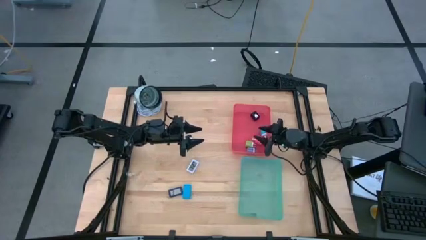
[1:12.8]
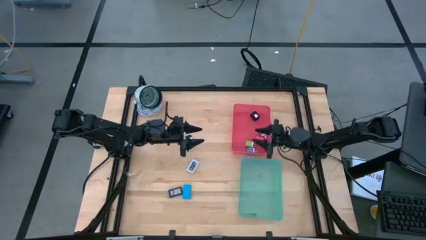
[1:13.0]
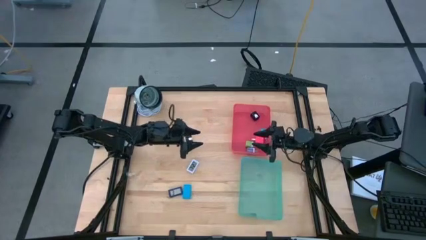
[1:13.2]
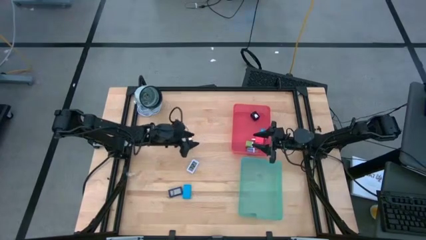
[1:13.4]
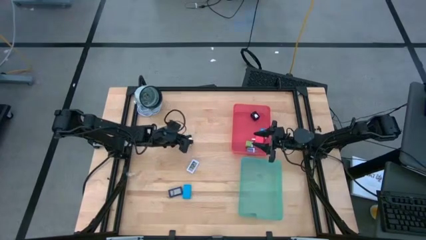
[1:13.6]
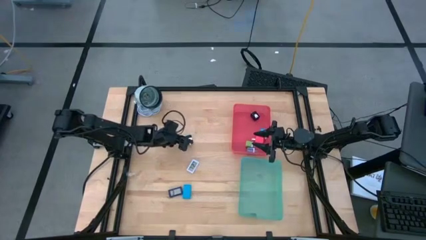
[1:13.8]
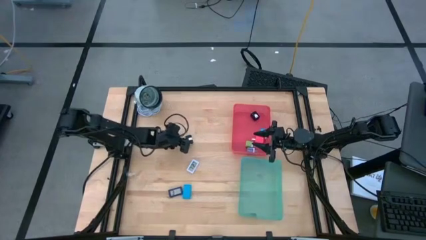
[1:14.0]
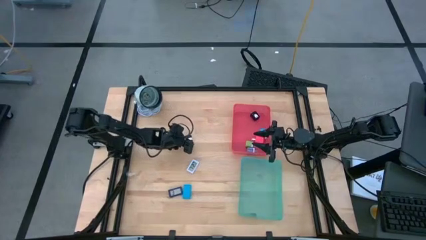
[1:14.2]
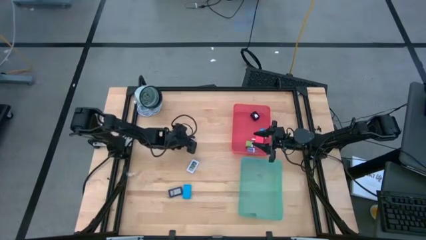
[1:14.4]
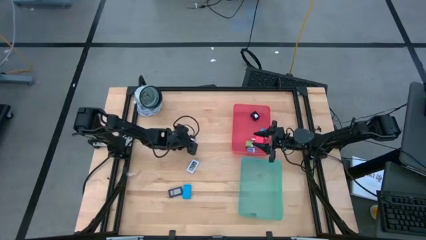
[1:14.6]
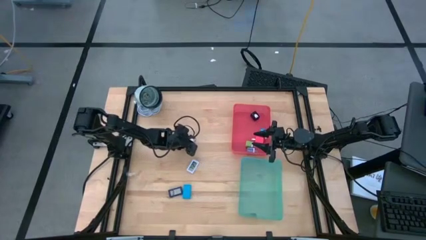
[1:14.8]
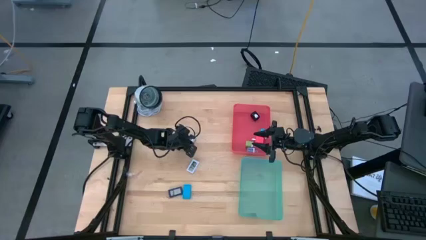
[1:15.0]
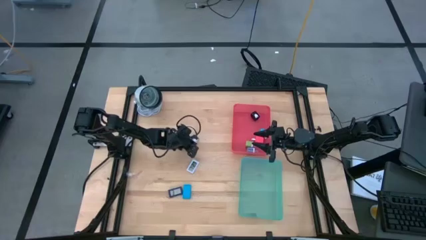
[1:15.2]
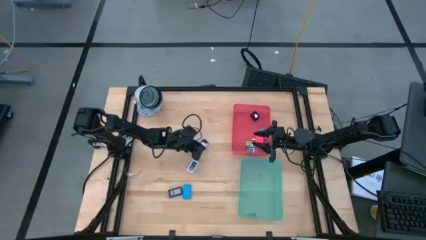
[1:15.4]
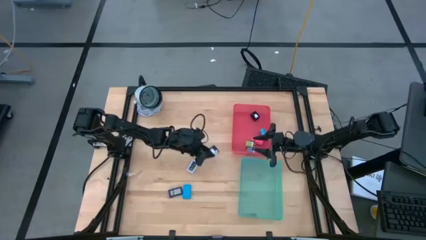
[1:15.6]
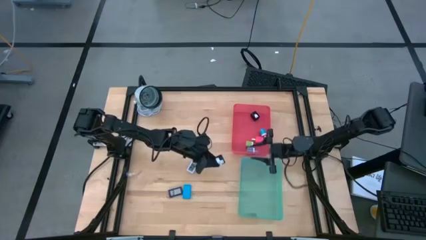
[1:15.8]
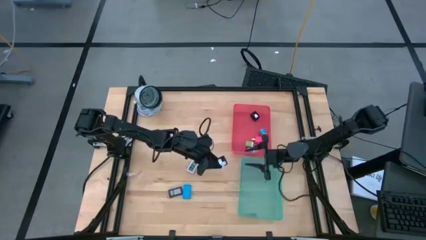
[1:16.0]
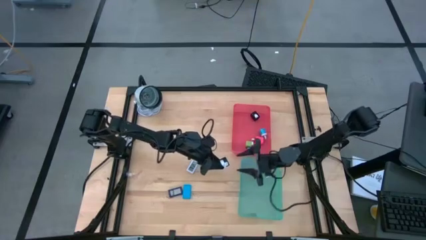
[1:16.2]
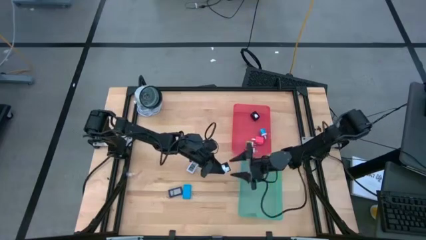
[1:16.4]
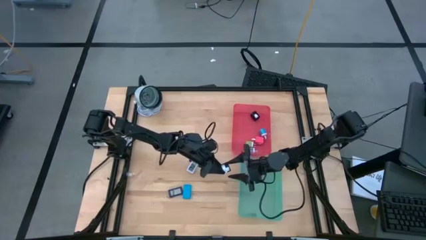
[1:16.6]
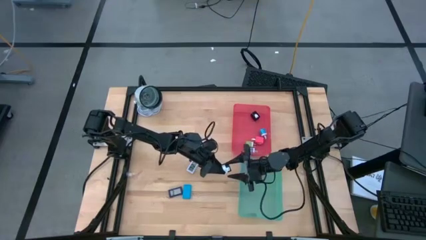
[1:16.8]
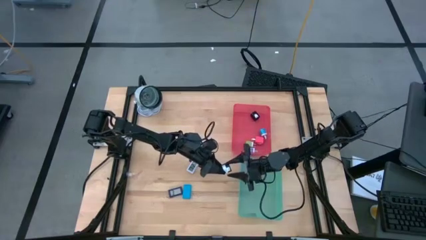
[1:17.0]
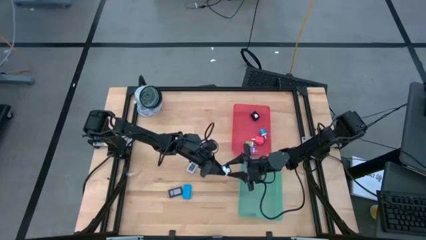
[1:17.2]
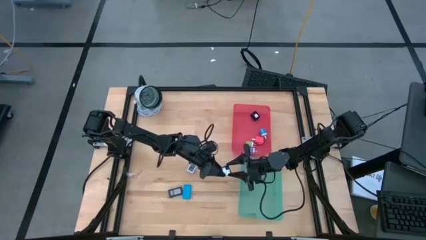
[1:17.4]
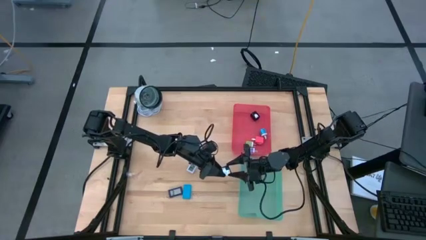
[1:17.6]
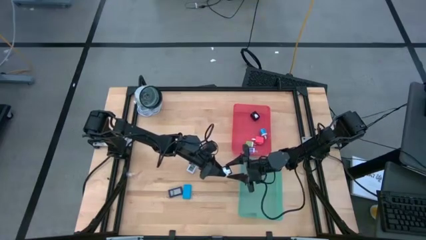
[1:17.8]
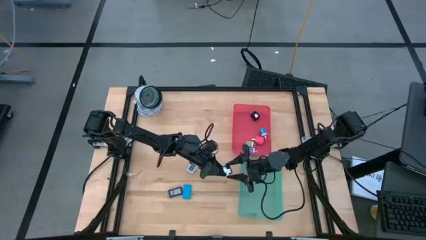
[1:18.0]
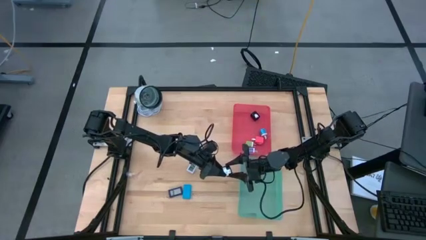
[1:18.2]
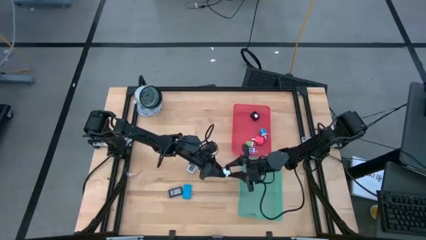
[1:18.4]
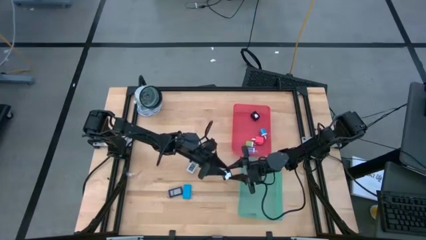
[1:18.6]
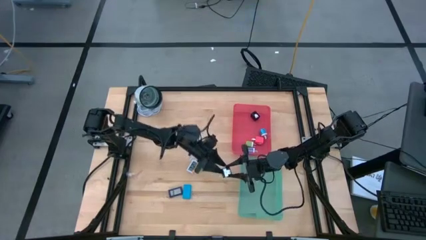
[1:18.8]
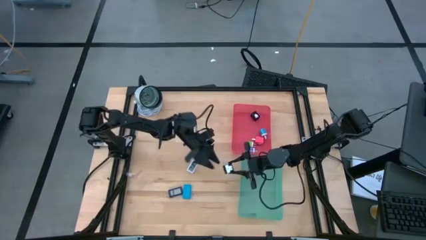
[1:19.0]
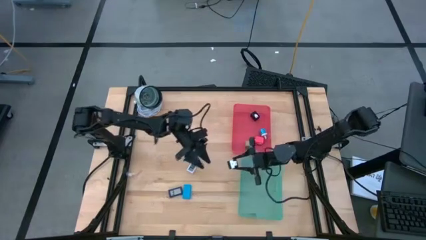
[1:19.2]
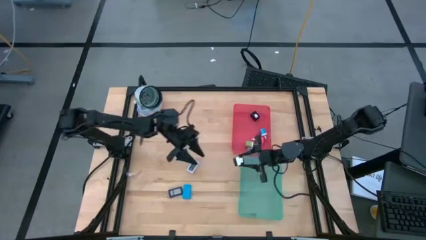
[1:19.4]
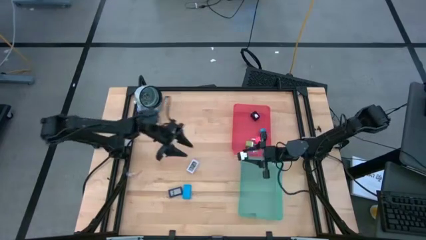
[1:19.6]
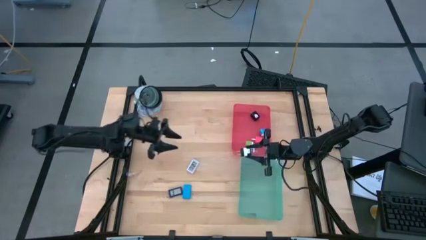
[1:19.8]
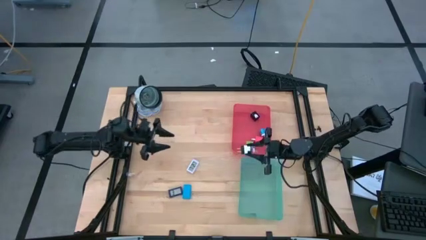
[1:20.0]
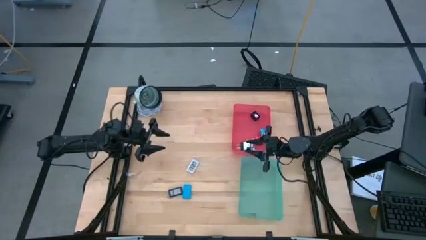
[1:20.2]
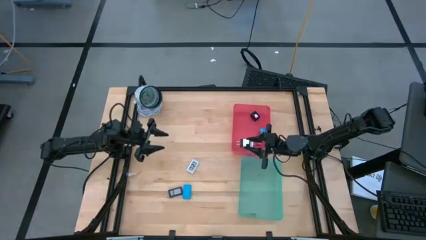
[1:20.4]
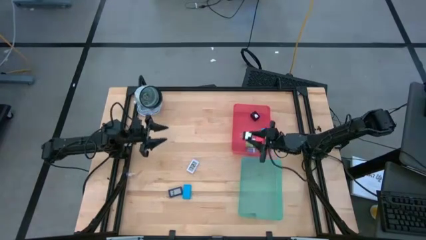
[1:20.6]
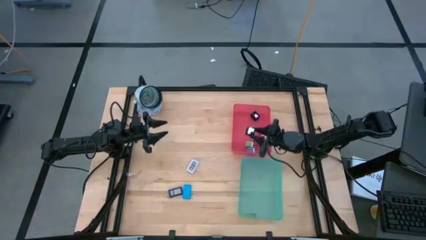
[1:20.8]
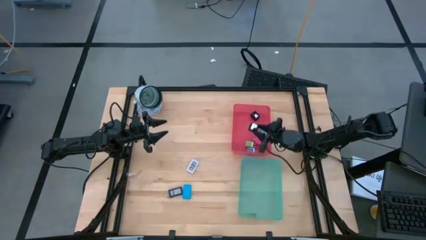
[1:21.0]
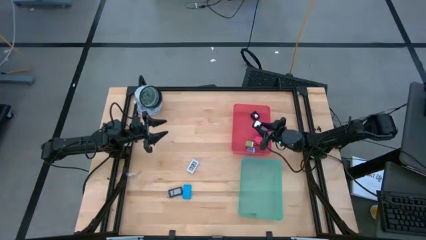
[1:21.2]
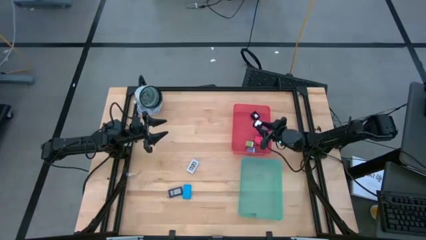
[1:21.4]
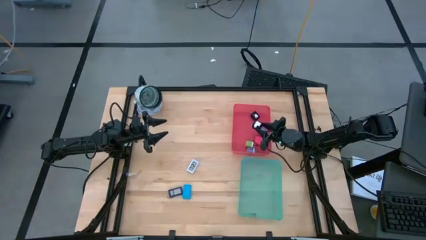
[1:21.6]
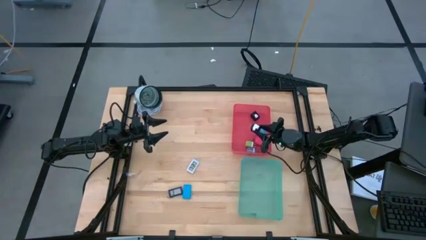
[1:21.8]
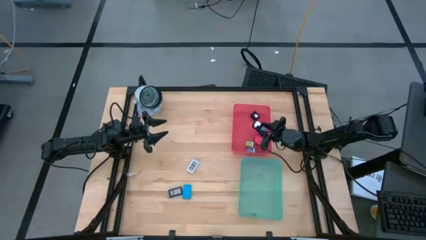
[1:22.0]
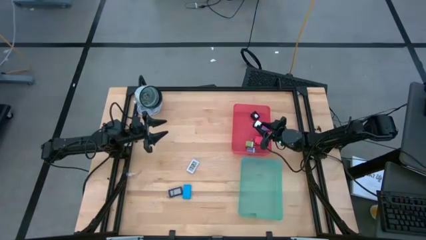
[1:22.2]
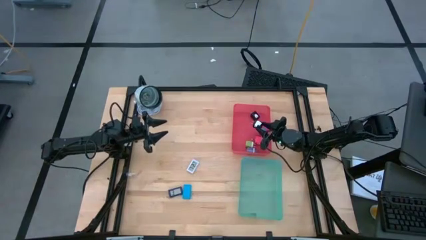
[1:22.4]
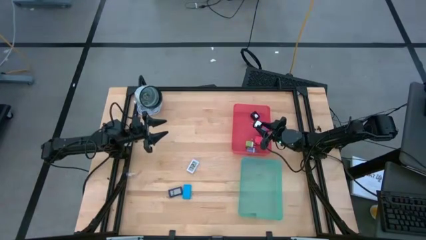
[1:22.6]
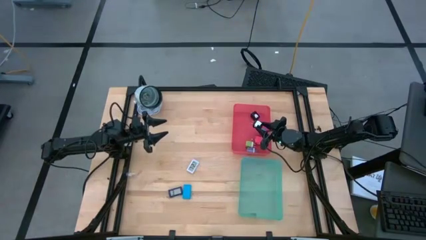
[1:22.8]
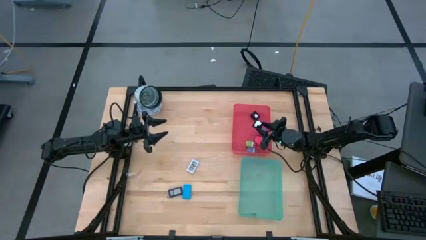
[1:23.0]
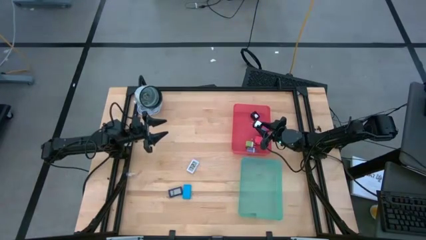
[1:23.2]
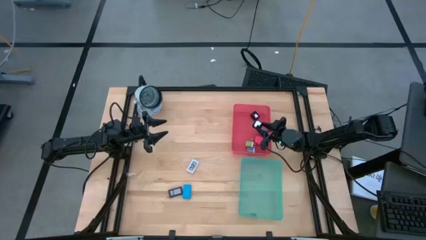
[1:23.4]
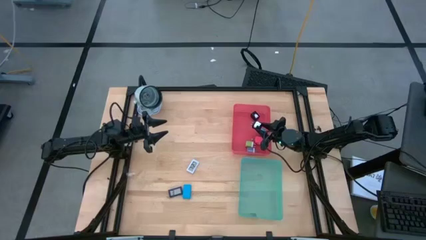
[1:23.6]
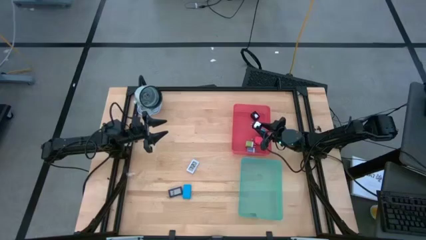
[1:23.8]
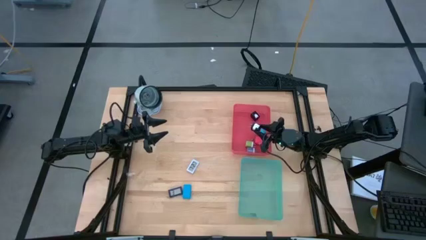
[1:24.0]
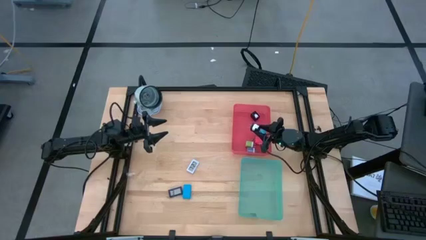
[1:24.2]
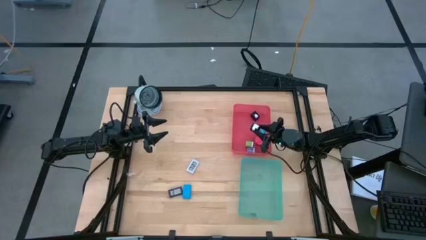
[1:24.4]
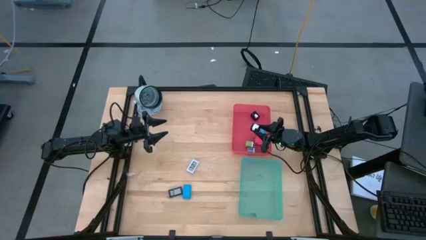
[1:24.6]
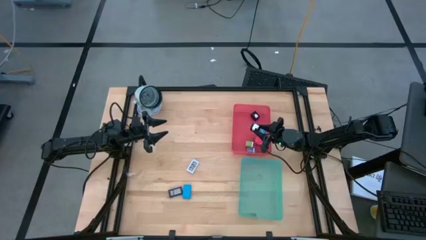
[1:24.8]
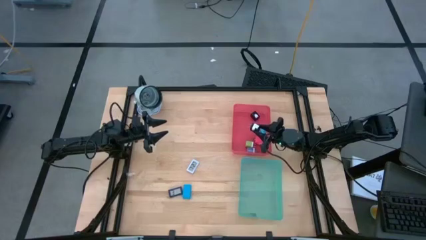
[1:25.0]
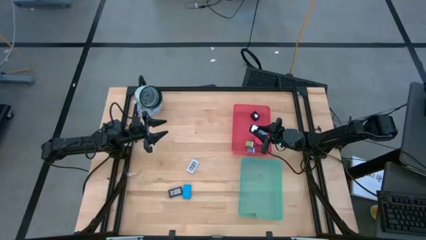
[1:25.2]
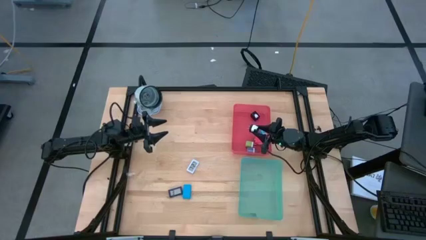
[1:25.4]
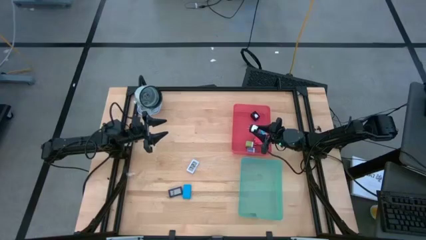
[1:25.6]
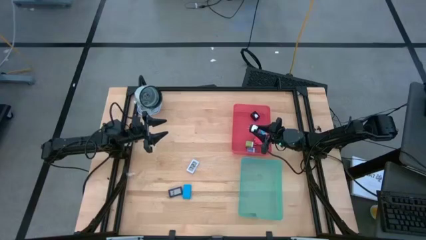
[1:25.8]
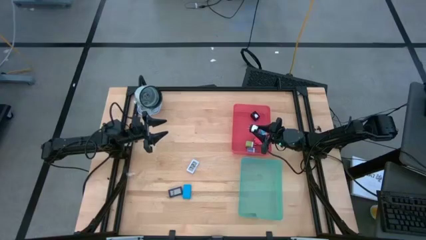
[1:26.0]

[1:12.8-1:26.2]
Task: Pick & Place Office items
Put the black charger adapter into the red bin
